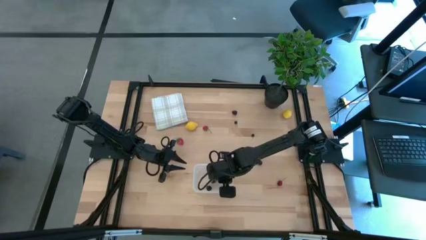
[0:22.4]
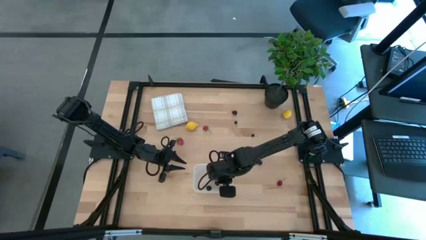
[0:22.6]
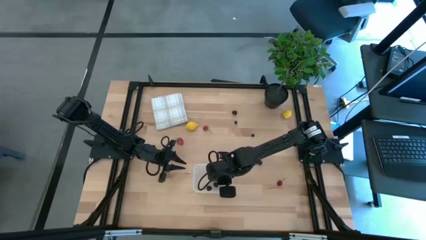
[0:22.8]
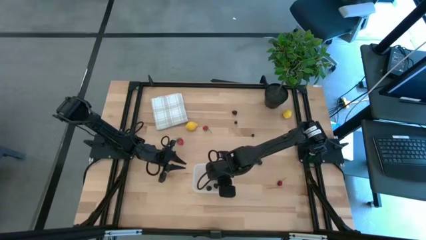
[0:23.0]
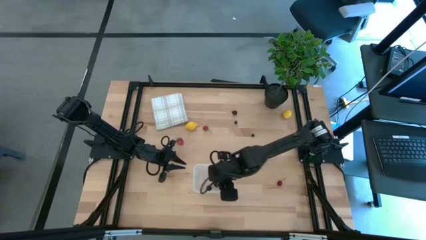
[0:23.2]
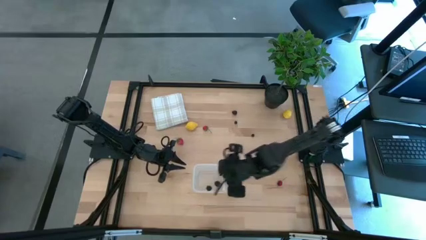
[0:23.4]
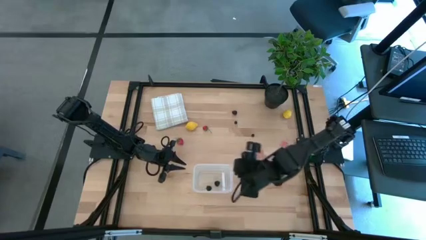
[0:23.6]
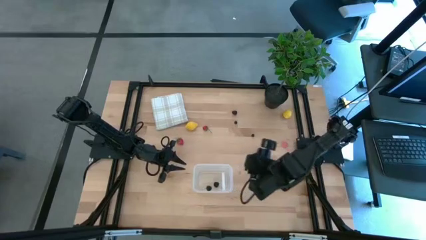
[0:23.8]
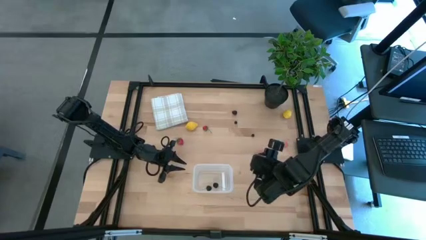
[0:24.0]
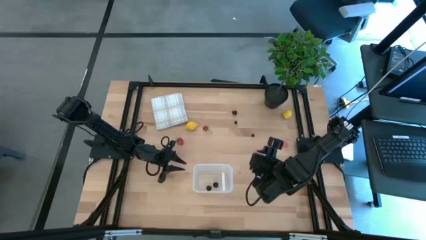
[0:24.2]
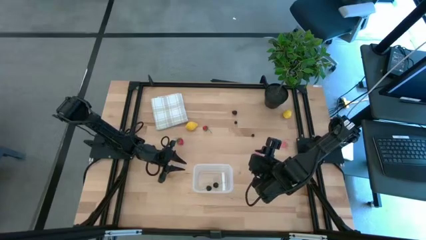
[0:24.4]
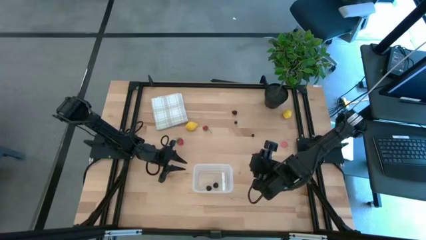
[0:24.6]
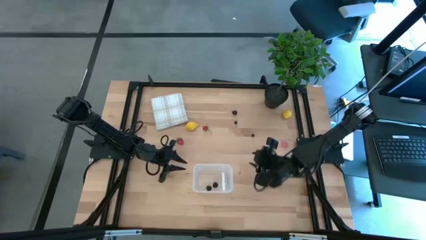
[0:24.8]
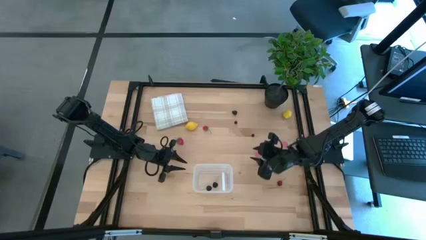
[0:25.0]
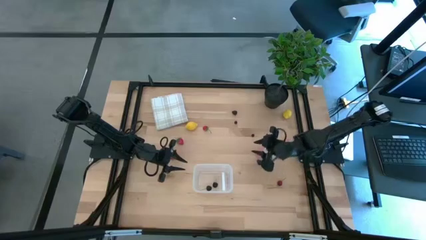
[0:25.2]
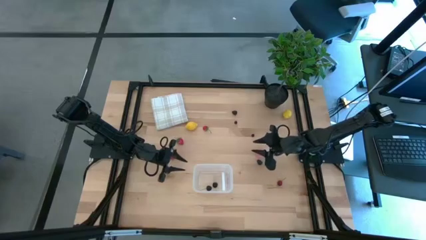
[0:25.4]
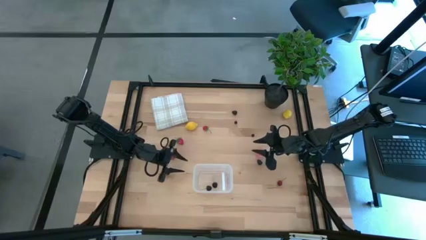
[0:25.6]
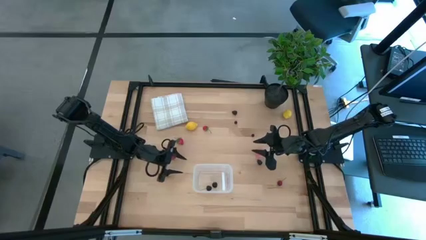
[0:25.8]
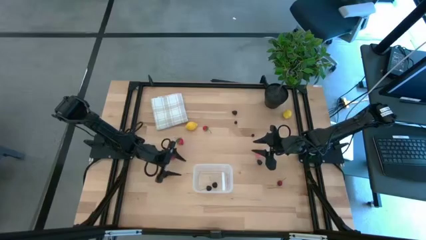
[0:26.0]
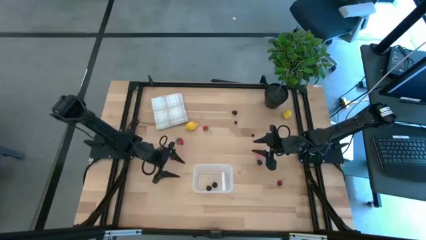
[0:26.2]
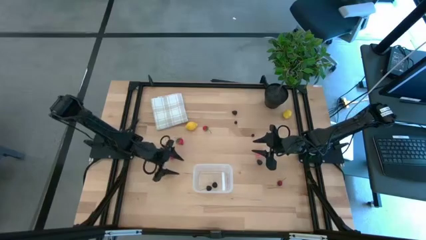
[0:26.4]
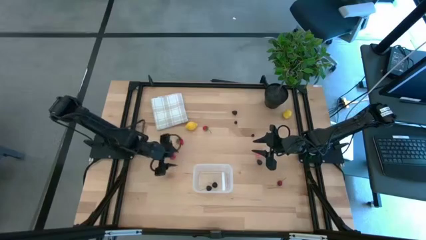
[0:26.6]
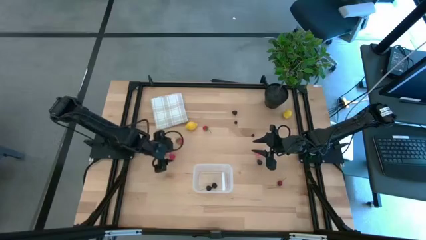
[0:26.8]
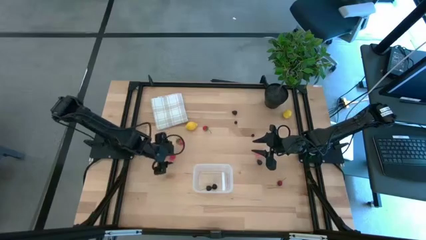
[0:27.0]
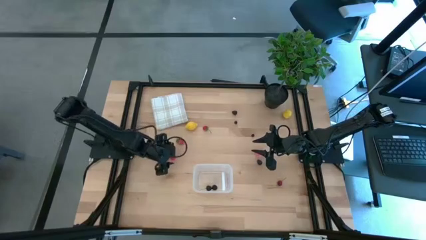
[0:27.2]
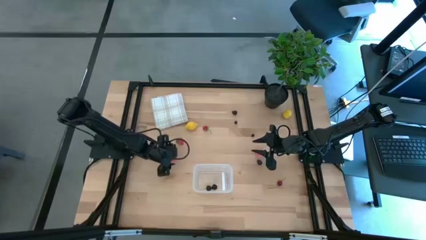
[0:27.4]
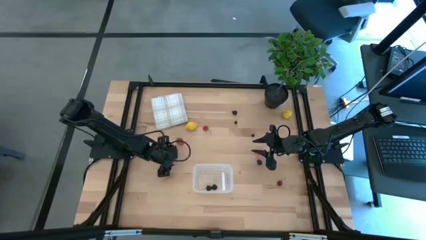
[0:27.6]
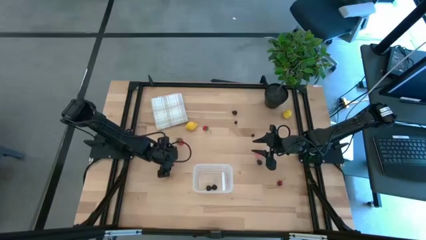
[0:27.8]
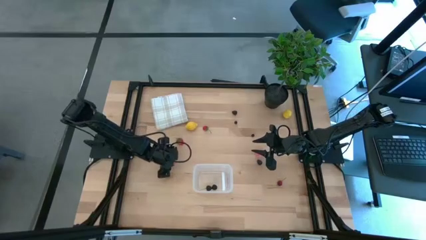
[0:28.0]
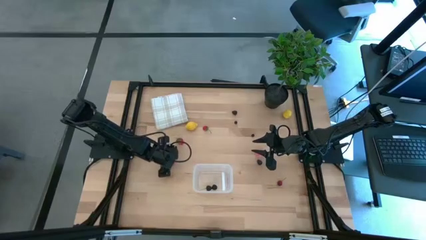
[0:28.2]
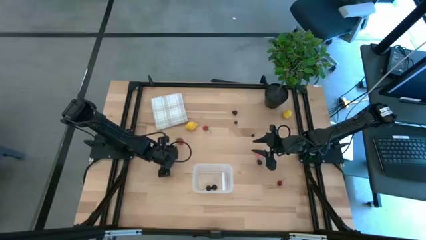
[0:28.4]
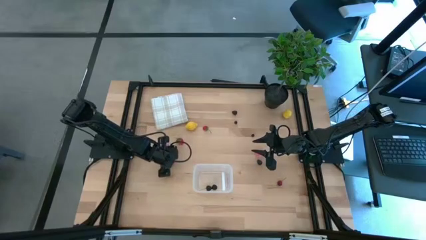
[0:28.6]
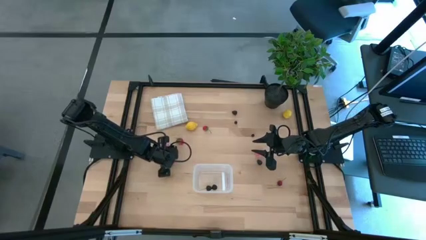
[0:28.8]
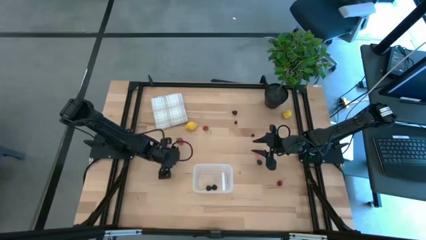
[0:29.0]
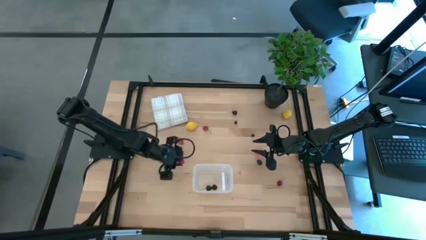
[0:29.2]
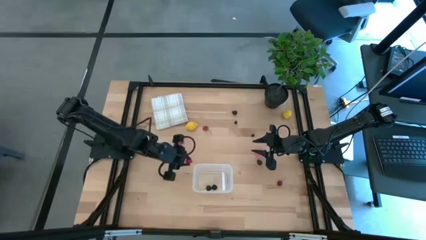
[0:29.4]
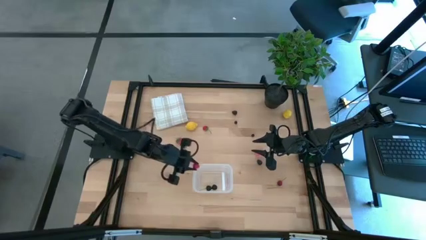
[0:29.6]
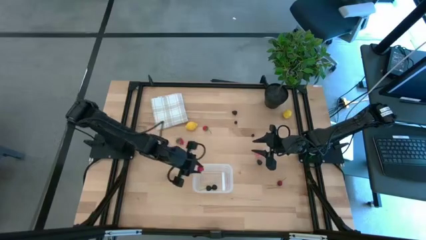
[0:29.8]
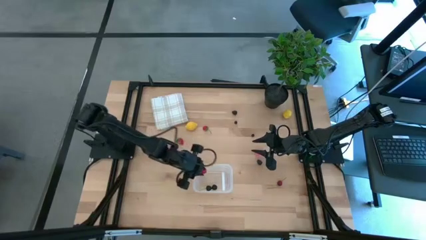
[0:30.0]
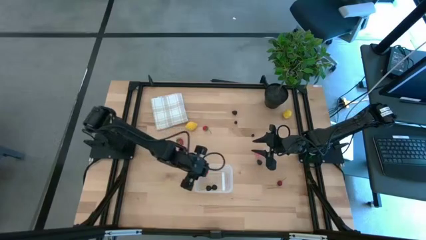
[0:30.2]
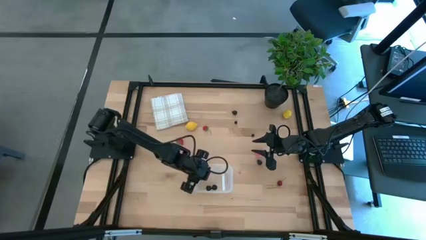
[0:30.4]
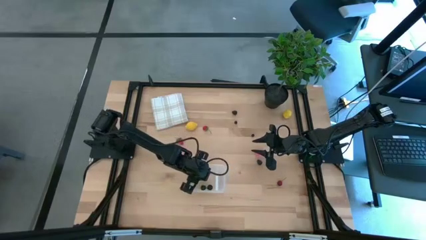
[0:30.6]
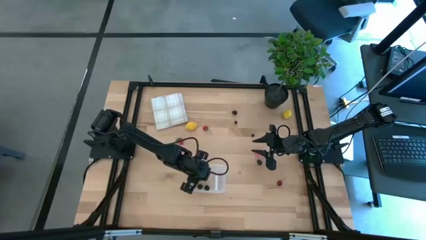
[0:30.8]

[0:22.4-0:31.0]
Task: Pick and placing Produce into tupperware
Put the raspberry into the transparent bin

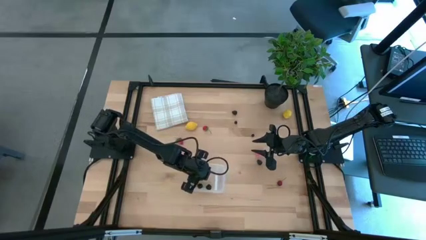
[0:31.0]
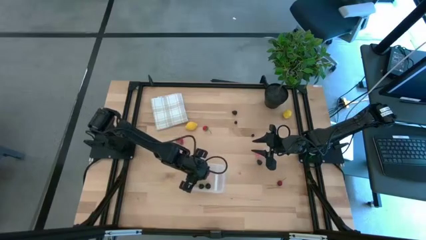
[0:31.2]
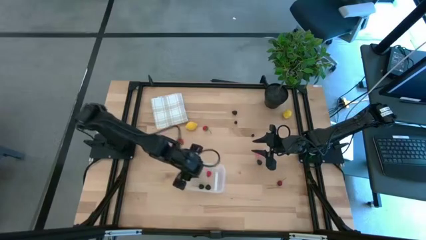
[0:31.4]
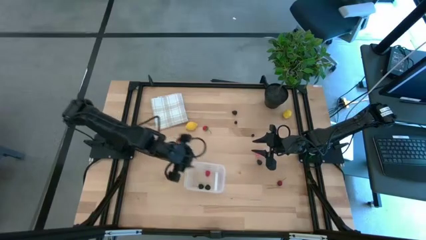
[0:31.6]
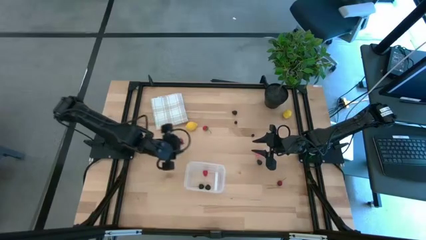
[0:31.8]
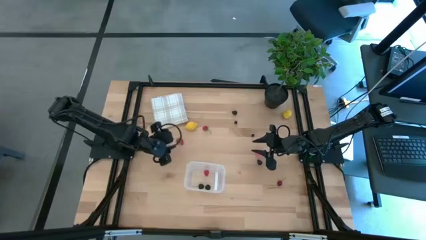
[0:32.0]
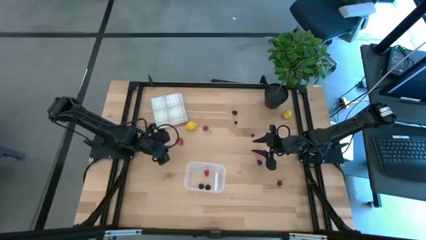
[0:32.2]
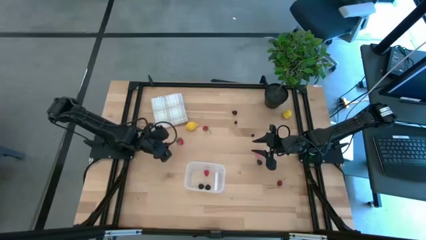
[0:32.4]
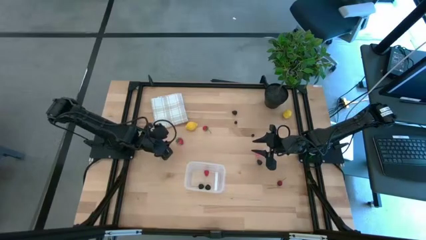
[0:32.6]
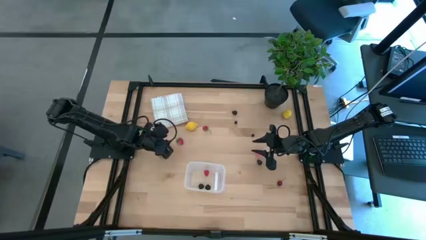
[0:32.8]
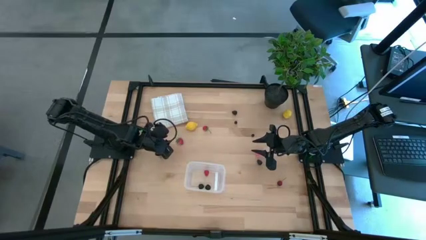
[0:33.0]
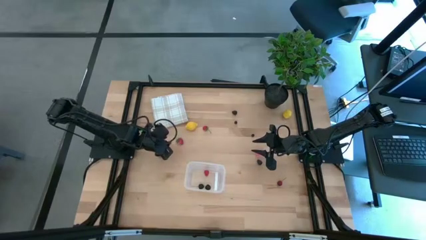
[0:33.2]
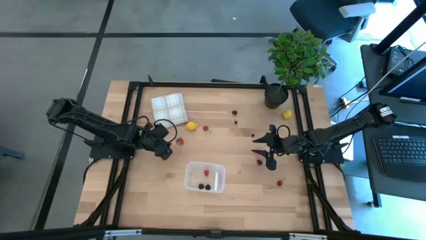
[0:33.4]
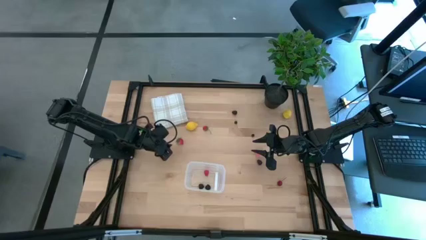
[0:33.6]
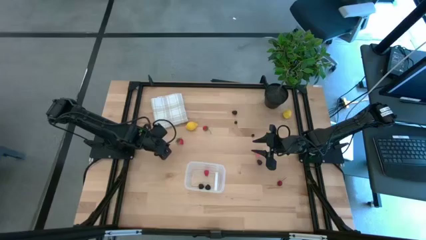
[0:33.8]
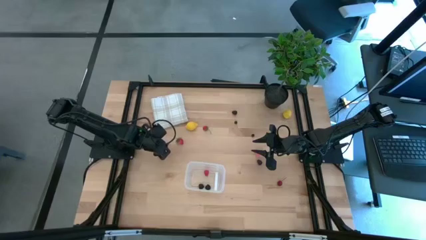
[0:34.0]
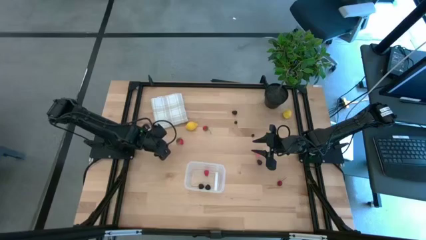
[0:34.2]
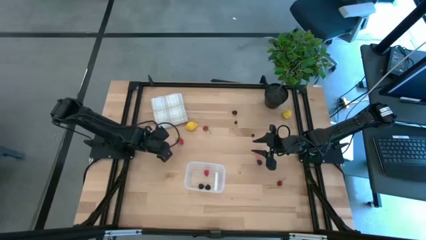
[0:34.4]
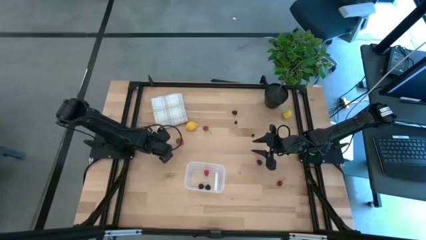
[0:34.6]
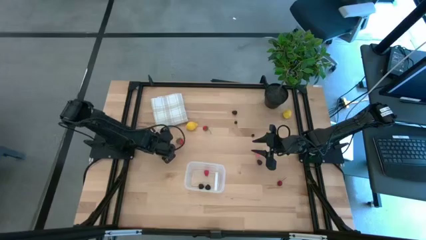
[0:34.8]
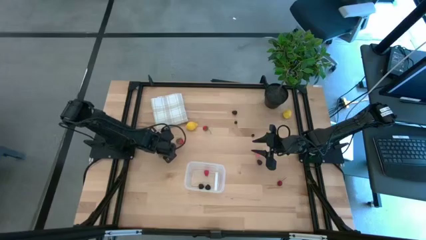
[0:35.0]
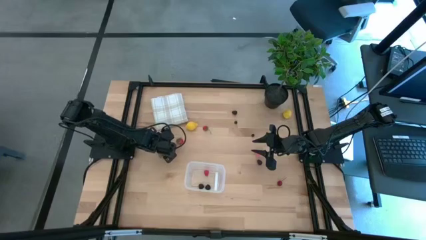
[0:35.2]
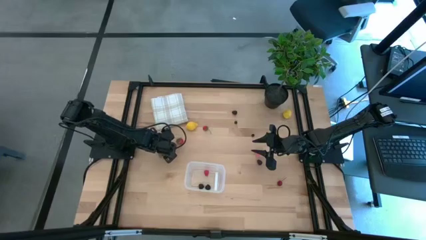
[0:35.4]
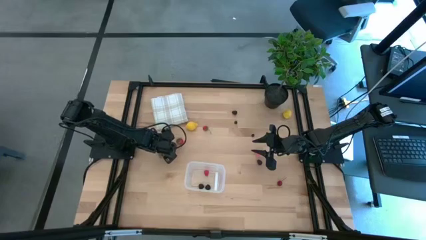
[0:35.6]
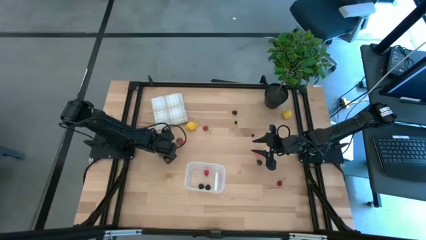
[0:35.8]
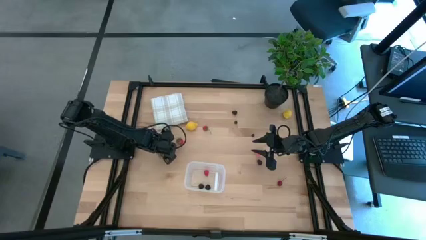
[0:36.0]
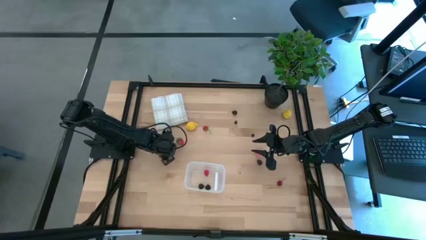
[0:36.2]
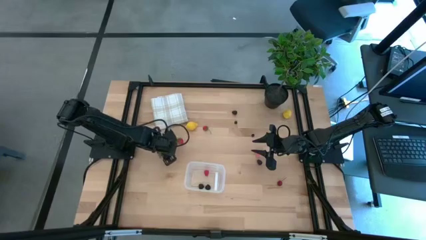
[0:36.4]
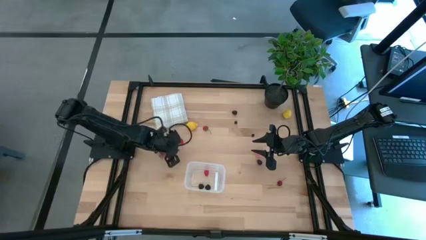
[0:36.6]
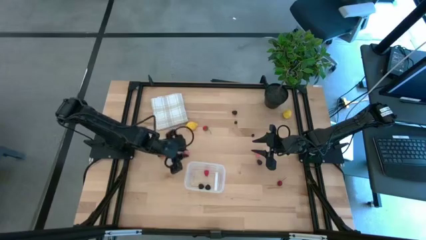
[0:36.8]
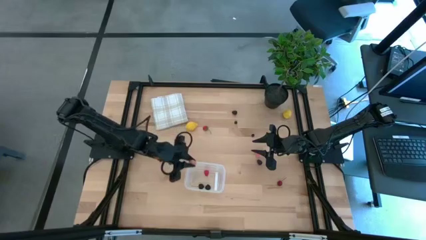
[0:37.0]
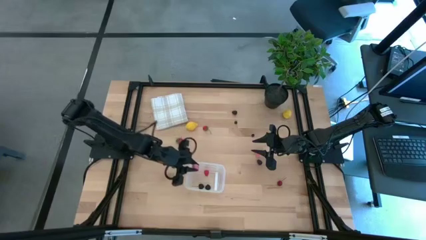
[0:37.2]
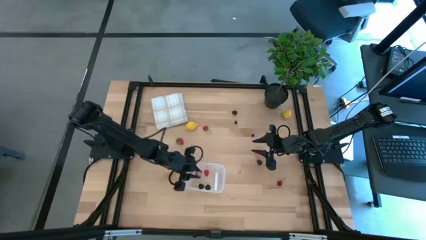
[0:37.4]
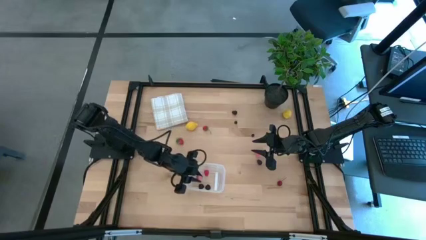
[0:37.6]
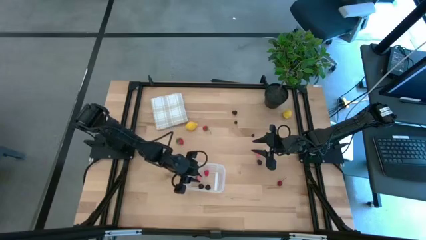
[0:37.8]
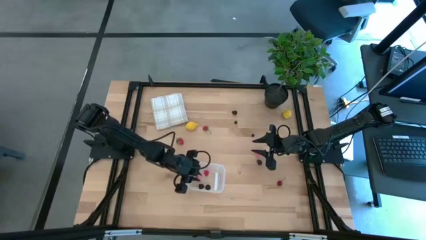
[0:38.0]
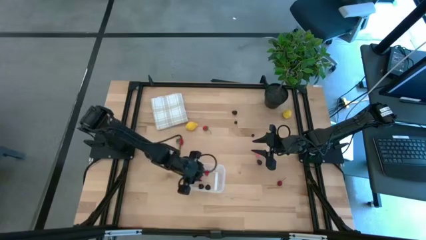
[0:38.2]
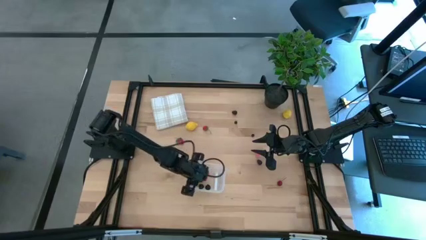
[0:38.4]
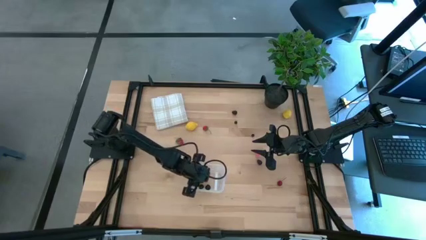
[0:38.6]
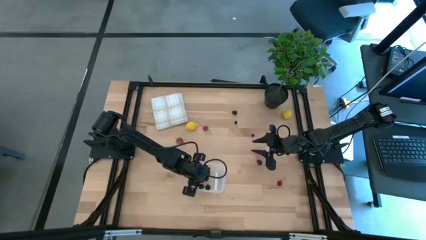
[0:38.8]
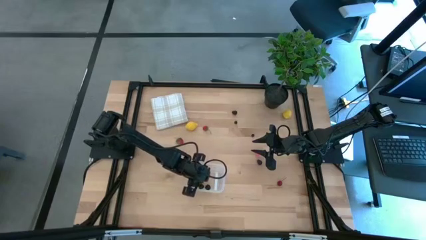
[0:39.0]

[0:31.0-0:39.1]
Put the left peach into the transparent bin
